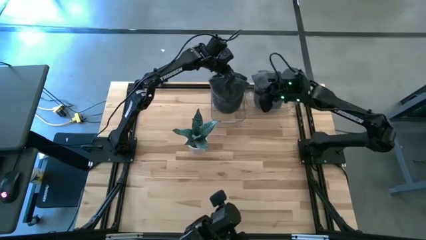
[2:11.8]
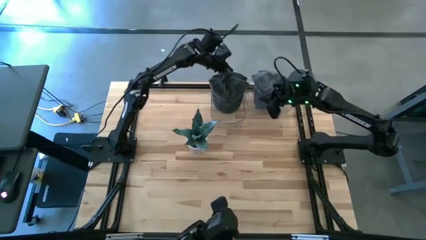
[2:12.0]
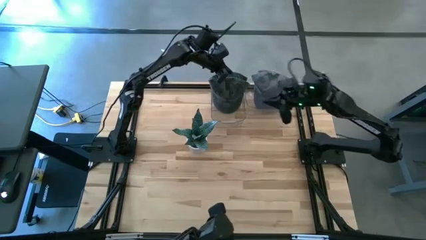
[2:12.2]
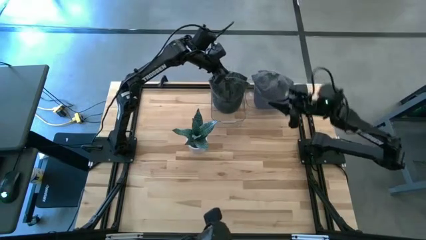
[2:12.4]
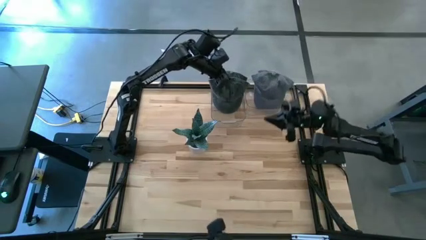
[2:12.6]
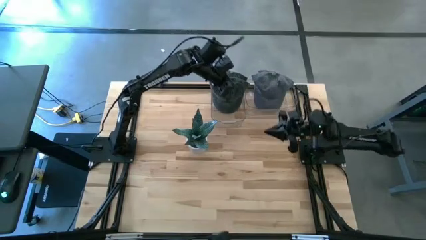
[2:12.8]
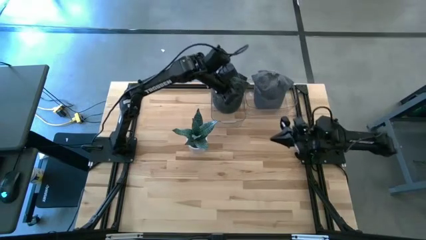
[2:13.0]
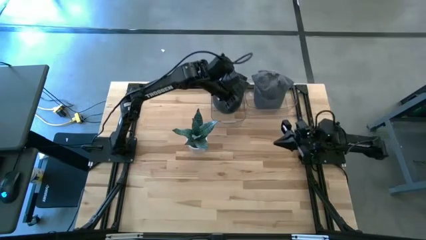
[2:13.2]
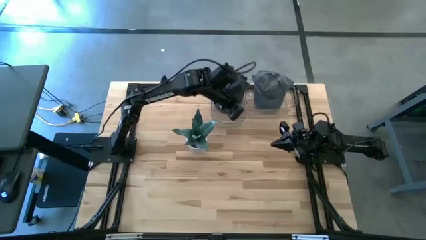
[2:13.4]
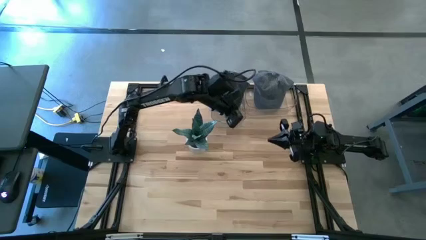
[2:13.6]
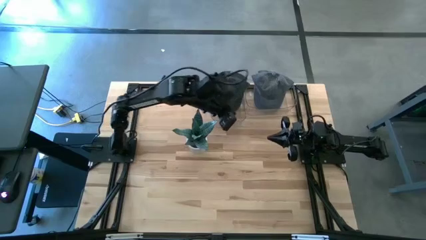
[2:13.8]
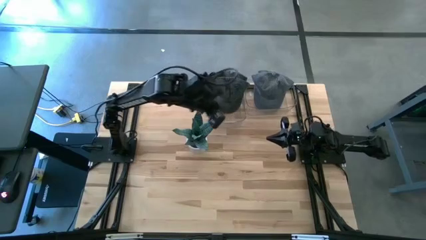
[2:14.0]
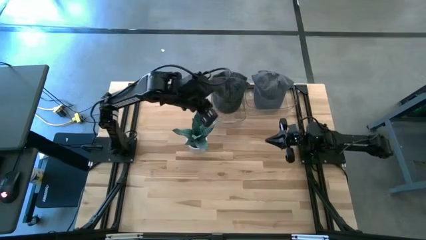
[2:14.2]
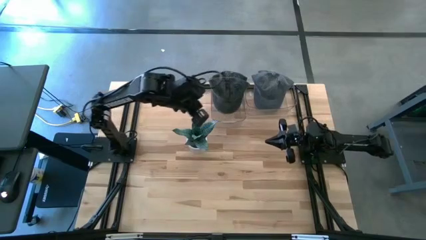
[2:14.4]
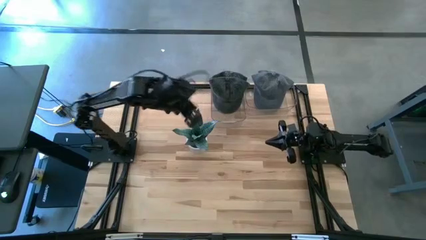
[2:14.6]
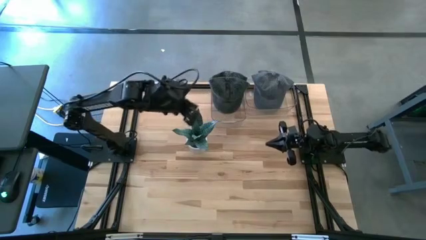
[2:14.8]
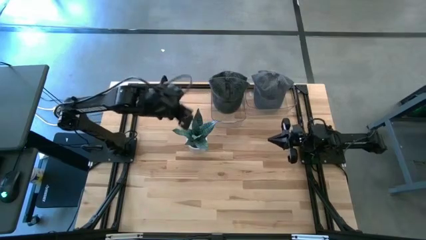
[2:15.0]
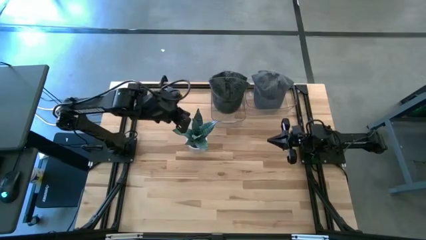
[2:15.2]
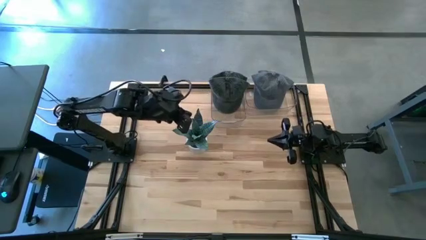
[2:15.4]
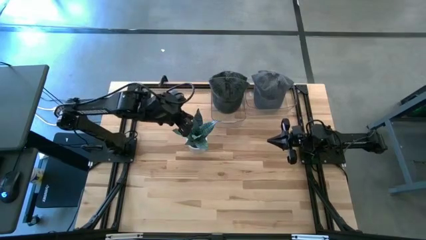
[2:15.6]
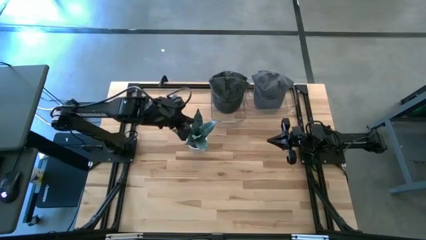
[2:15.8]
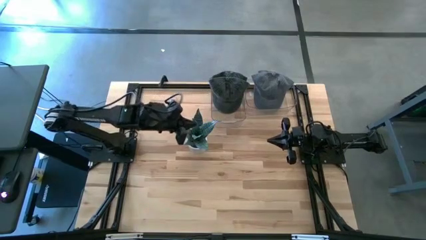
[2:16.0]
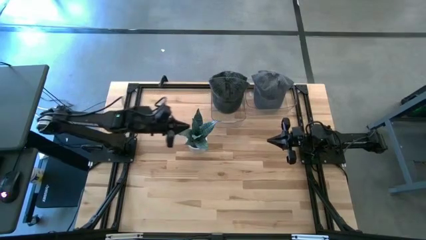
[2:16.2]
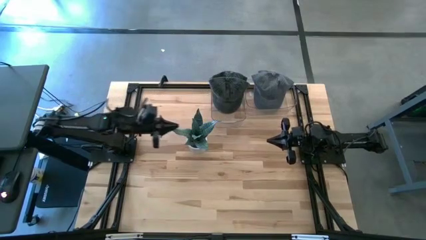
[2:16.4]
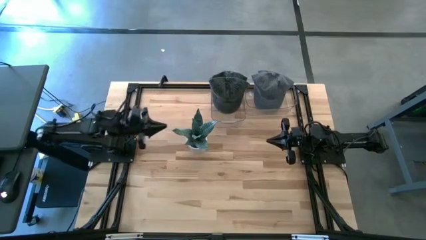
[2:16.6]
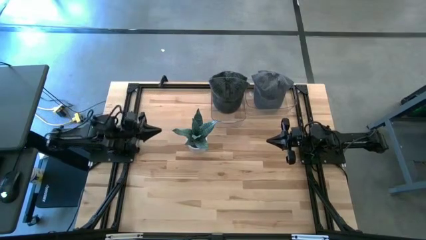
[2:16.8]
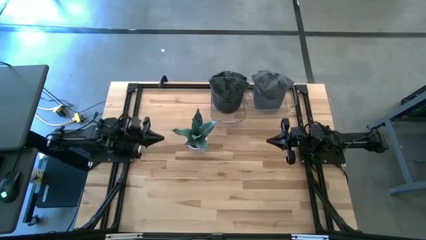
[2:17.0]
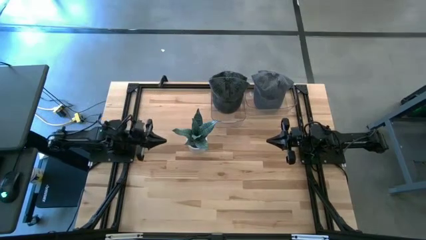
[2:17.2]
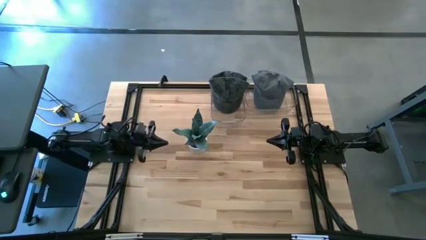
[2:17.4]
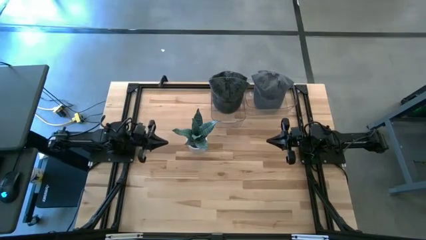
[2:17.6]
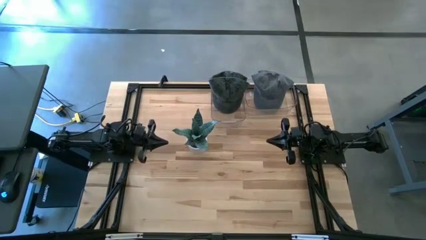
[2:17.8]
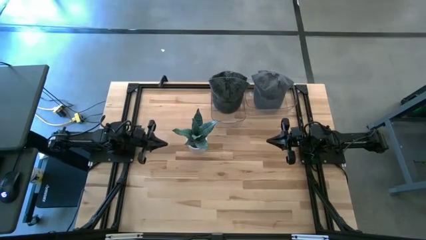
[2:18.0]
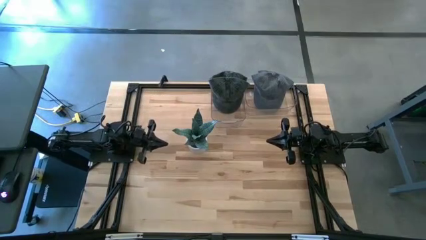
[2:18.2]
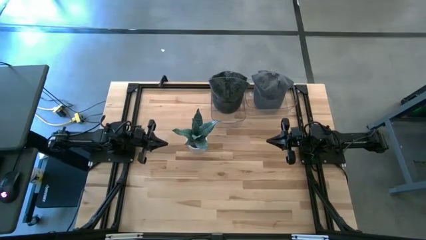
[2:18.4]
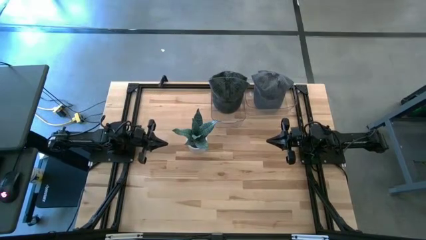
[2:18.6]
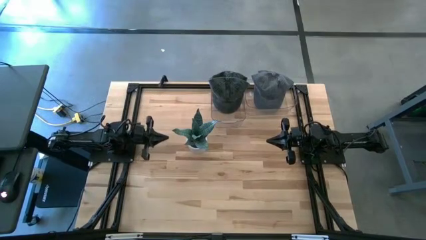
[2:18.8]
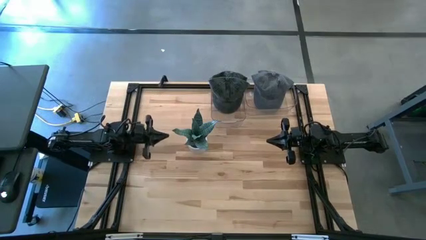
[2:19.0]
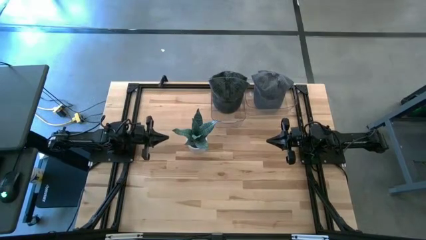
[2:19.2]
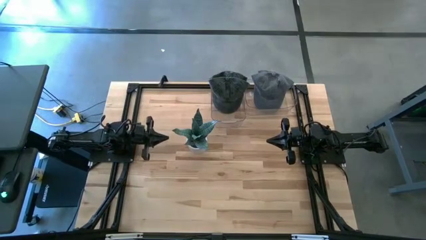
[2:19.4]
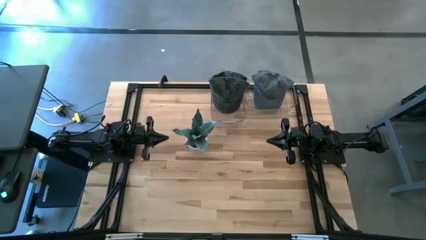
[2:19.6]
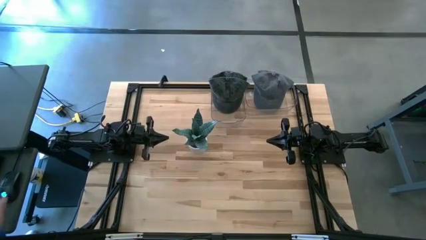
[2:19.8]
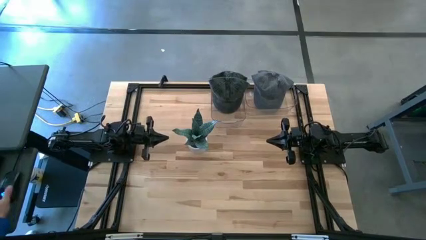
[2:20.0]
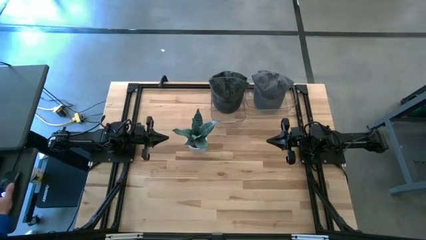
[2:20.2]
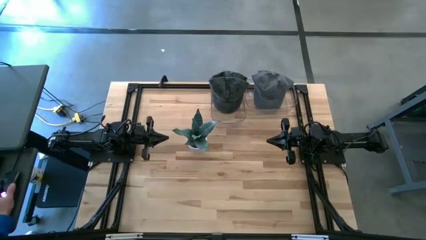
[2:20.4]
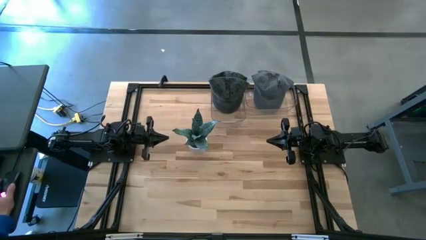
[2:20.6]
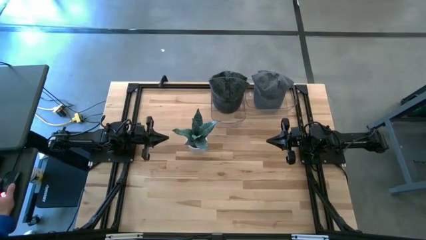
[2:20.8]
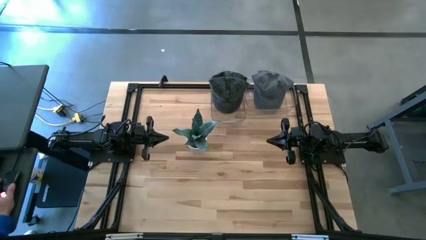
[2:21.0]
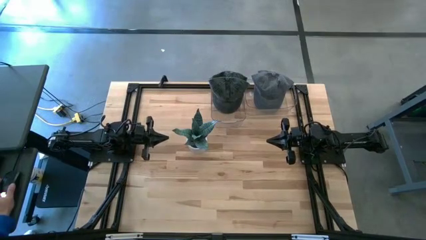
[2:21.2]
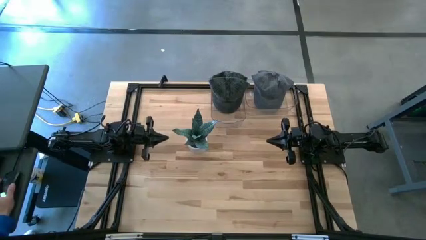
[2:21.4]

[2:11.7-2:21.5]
Task: Pick & Place hat
Return to Home Position

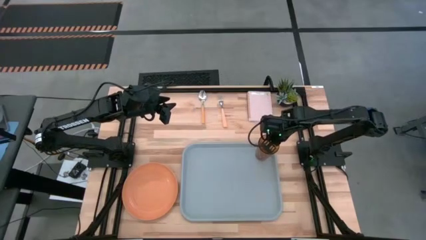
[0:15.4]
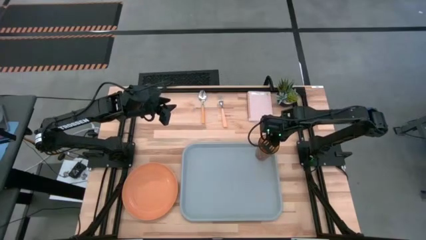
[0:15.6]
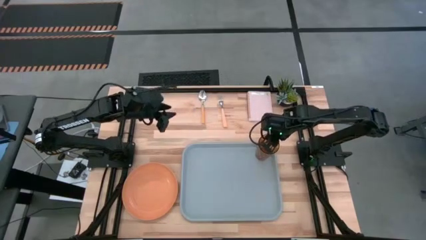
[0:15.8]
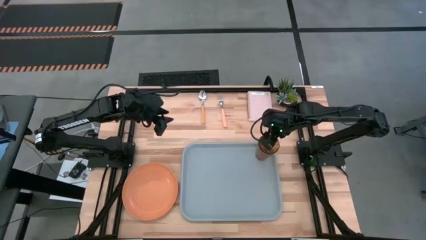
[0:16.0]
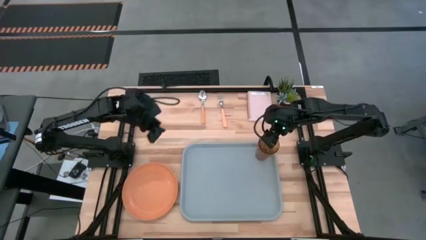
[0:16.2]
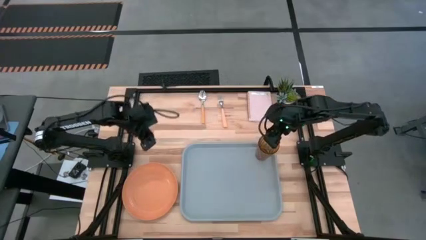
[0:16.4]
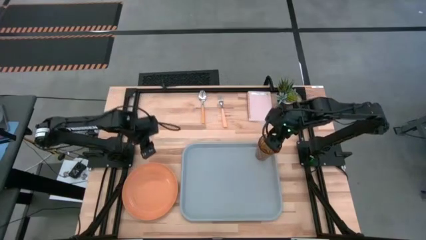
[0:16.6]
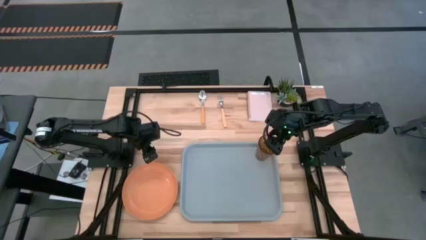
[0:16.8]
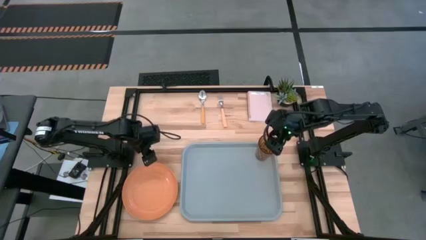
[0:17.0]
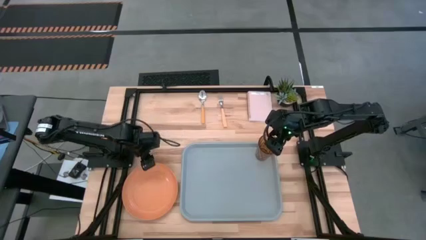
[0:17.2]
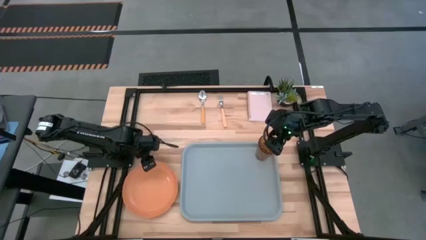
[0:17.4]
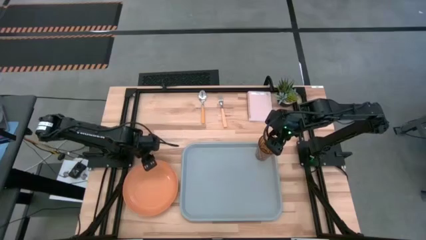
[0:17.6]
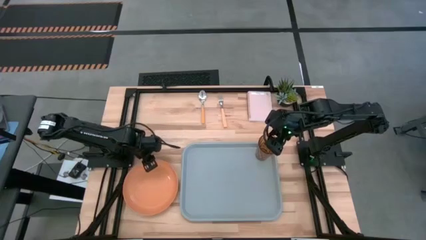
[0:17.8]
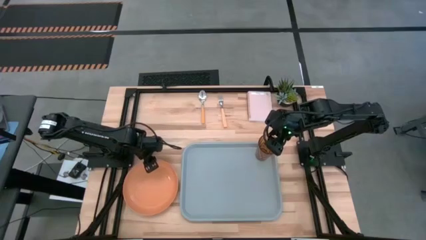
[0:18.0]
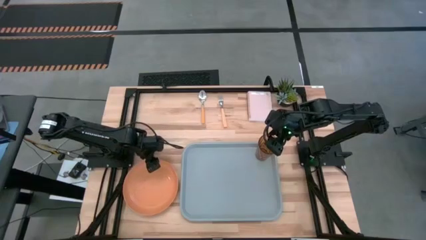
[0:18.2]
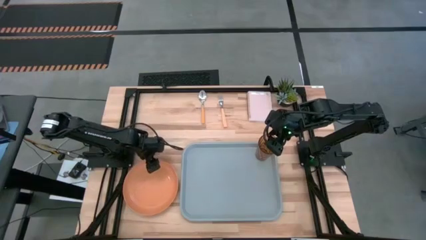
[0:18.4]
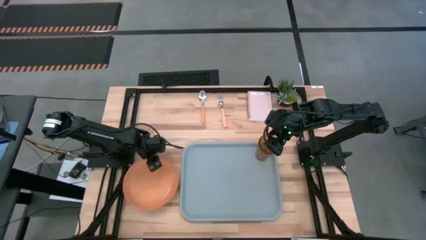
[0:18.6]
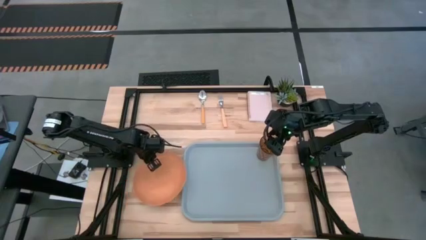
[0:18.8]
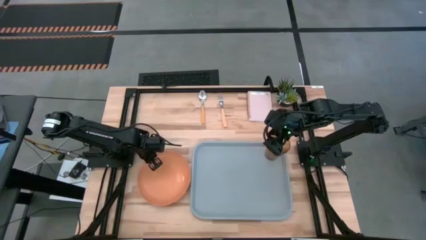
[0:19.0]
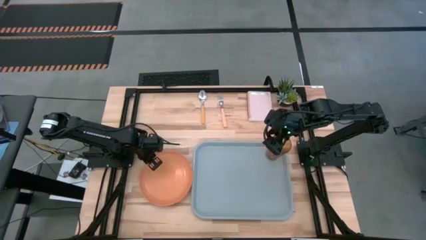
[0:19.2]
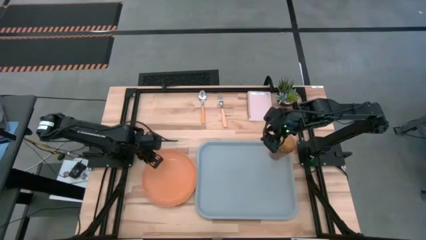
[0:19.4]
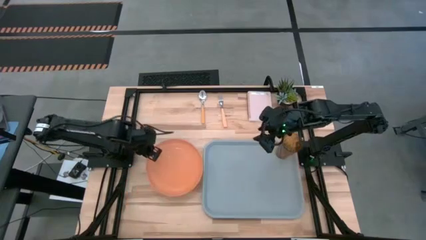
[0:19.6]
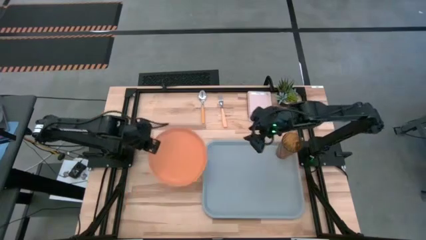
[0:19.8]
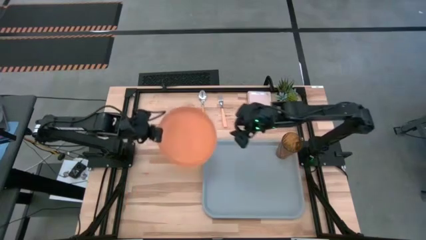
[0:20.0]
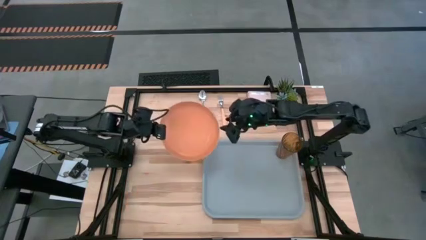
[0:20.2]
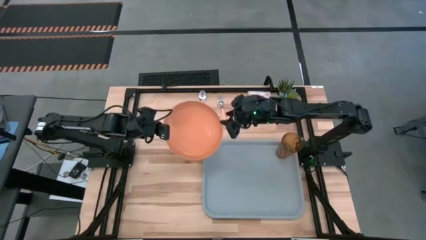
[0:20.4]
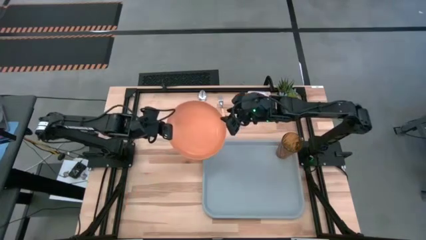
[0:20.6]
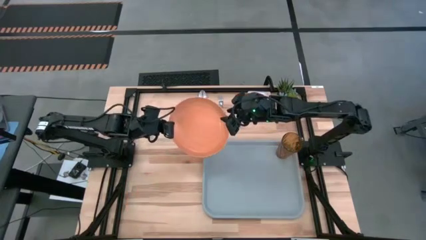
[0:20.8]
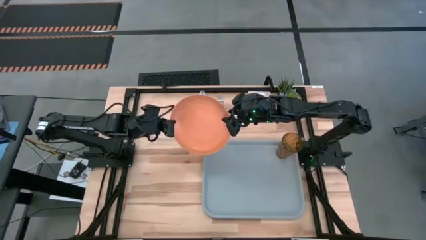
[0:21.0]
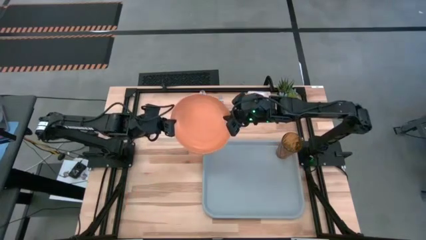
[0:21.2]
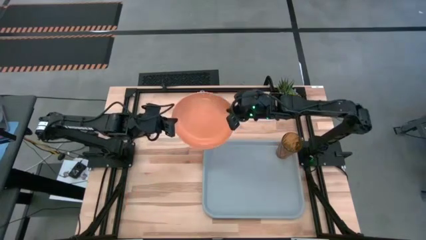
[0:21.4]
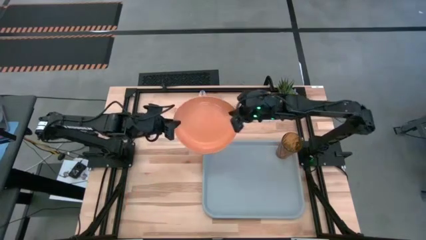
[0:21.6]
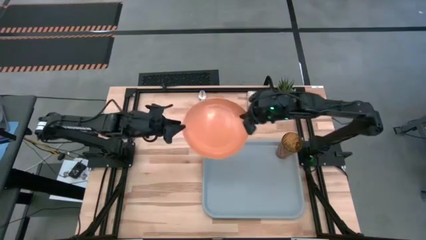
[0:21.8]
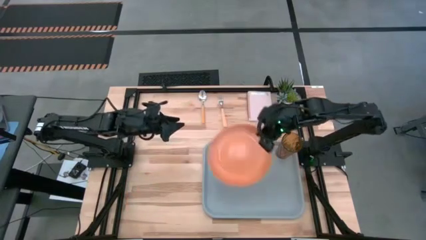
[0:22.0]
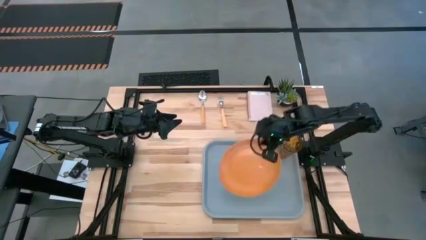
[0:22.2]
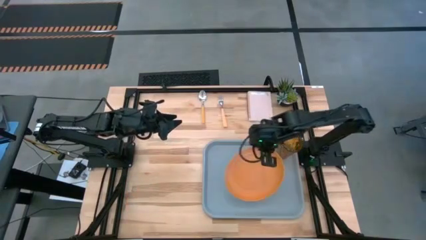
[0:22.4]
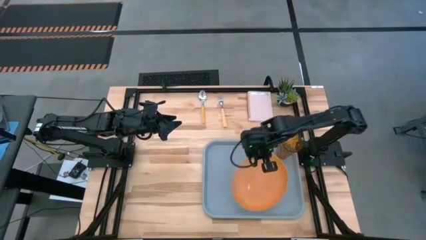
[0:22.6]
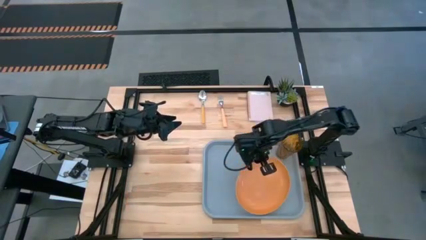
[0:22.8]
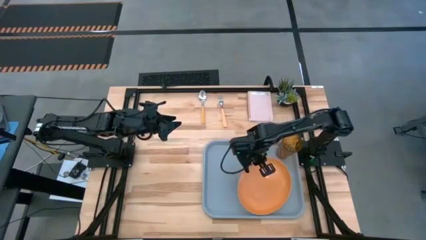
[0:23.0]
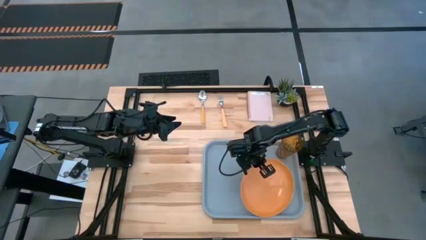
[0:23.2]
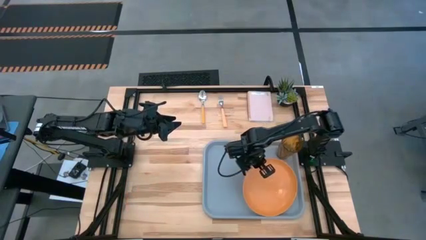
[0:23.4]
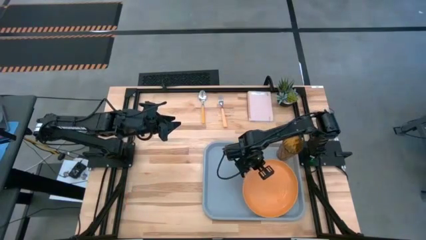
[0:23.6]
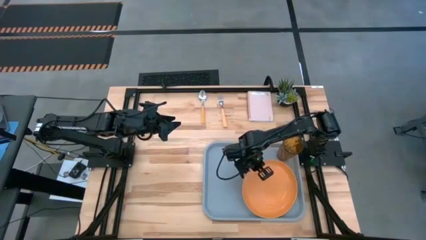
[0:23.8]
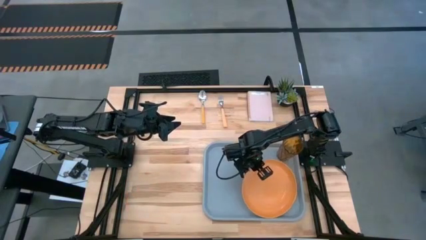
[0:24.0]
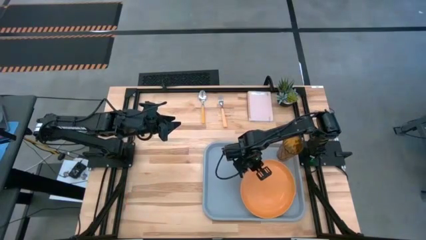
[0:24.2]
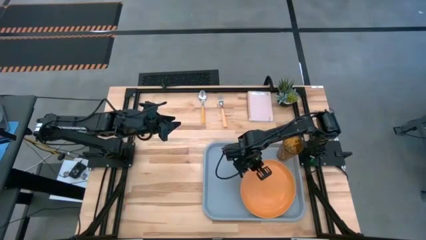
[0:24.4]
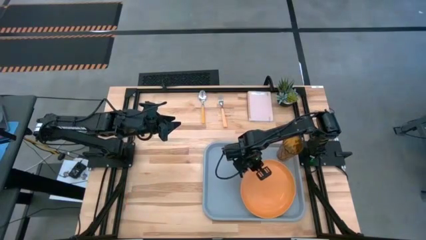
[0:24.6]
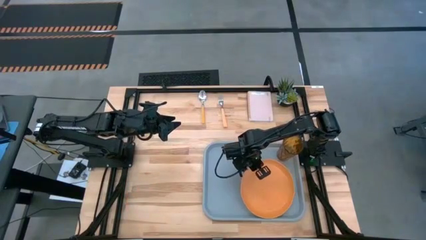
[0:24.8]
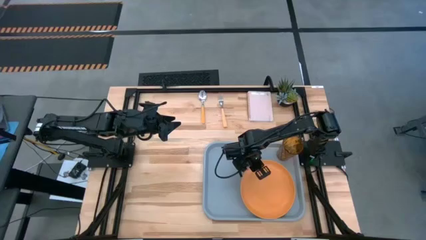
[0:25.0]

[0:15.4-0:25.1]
Task: Pick and place plate/cup/fork/spoon on tray
Put the orange plate on top of the gray serving tray
